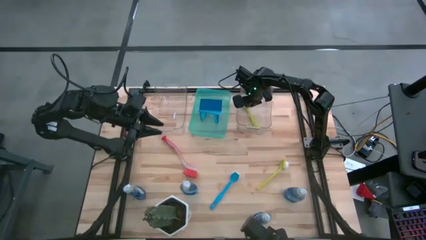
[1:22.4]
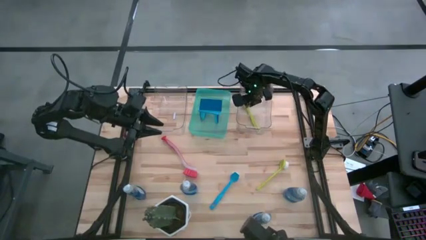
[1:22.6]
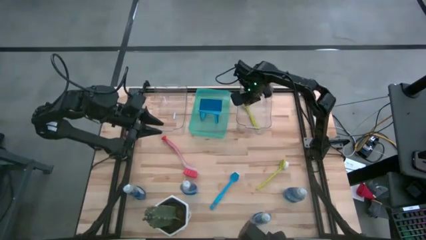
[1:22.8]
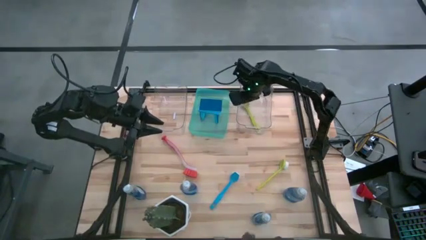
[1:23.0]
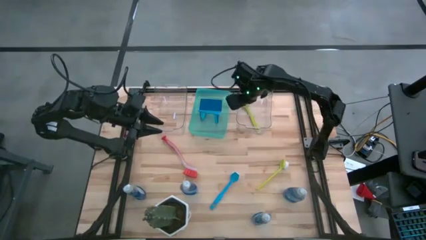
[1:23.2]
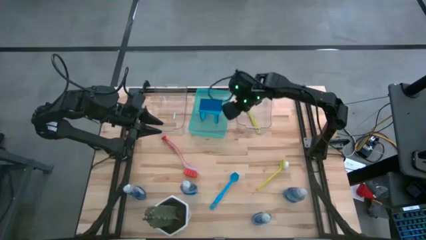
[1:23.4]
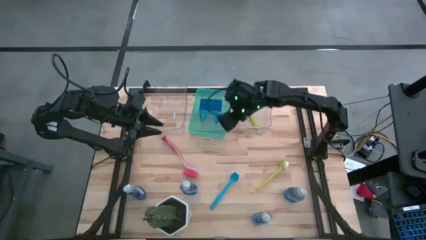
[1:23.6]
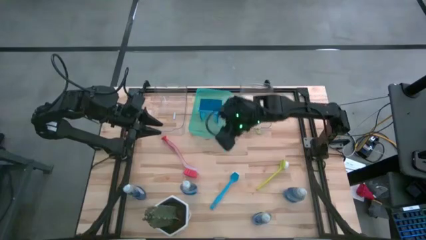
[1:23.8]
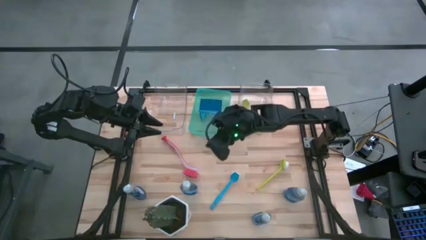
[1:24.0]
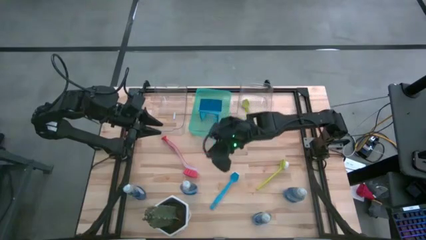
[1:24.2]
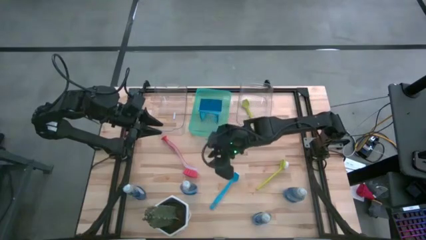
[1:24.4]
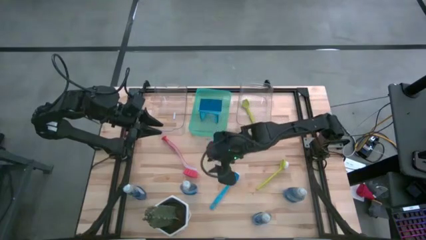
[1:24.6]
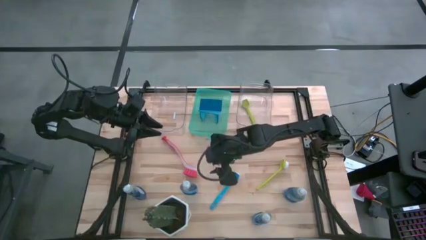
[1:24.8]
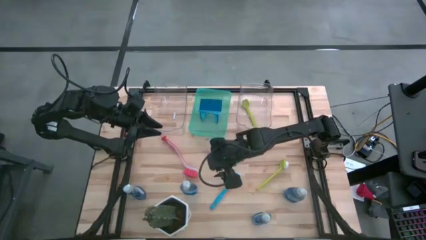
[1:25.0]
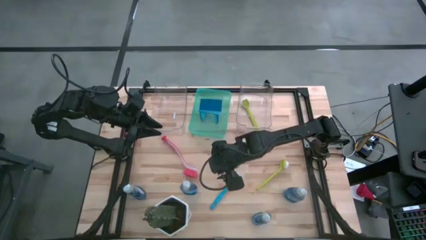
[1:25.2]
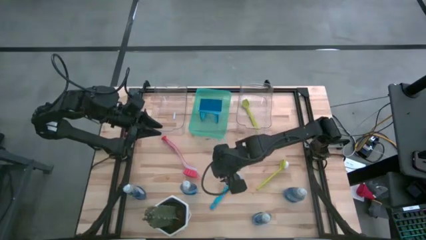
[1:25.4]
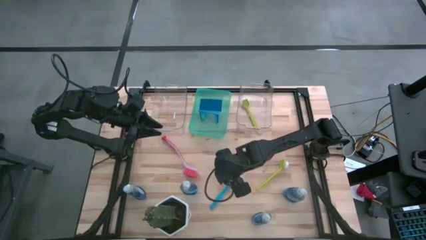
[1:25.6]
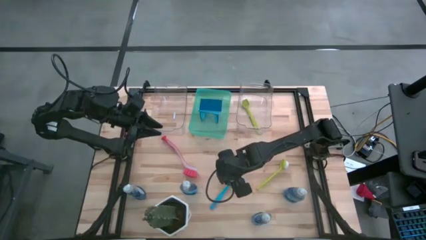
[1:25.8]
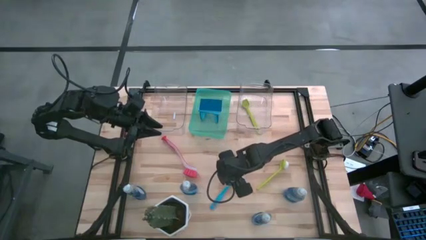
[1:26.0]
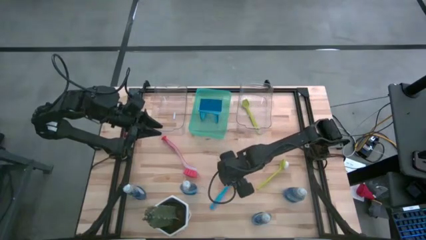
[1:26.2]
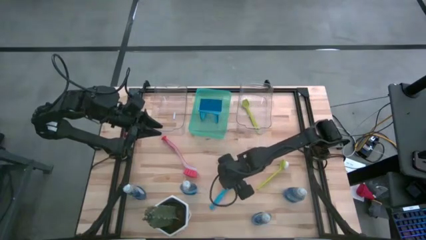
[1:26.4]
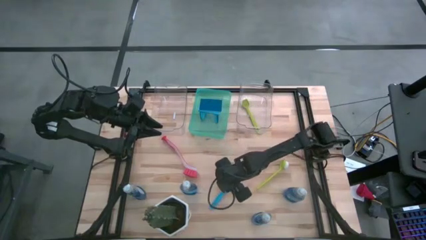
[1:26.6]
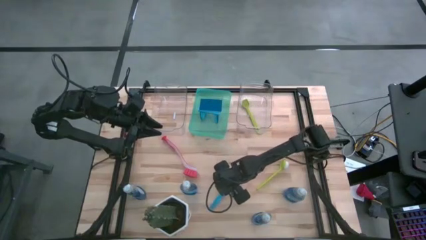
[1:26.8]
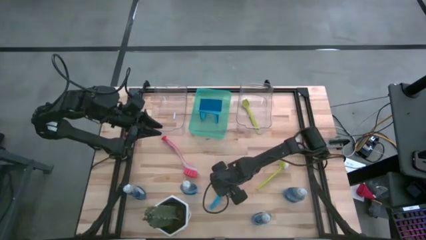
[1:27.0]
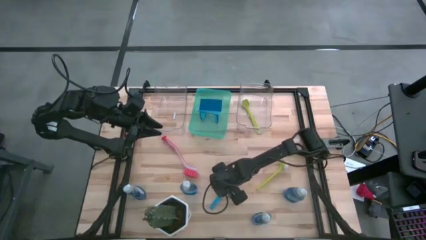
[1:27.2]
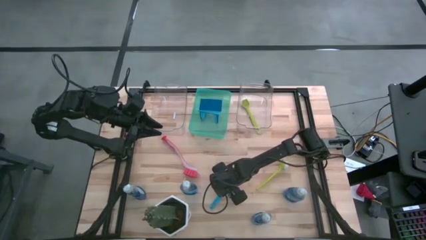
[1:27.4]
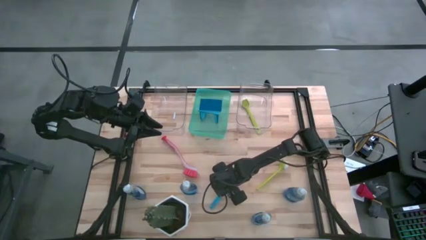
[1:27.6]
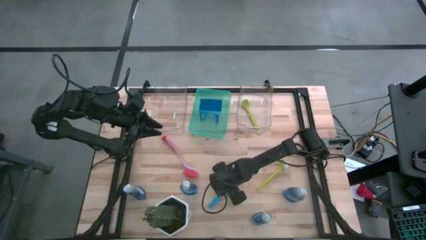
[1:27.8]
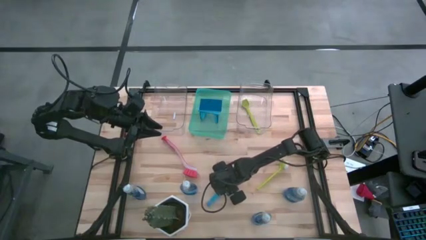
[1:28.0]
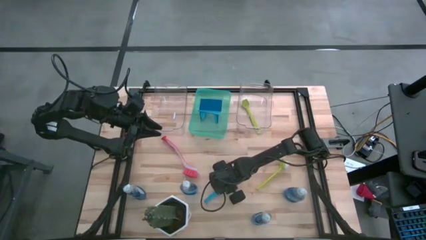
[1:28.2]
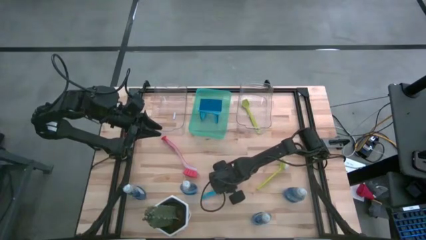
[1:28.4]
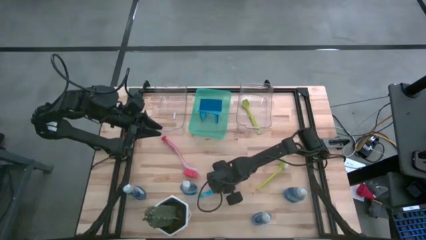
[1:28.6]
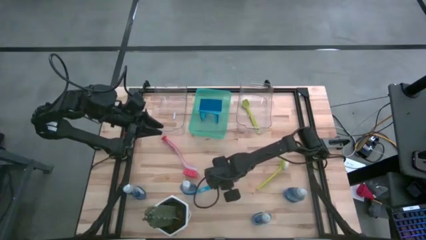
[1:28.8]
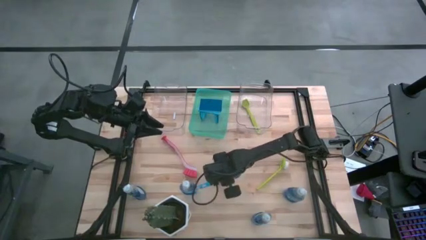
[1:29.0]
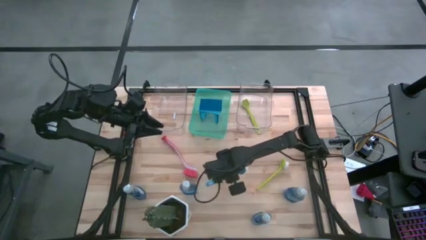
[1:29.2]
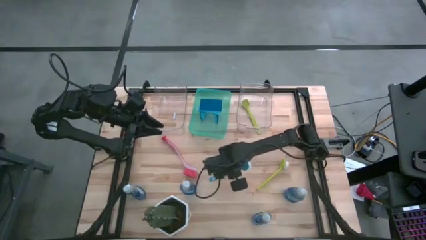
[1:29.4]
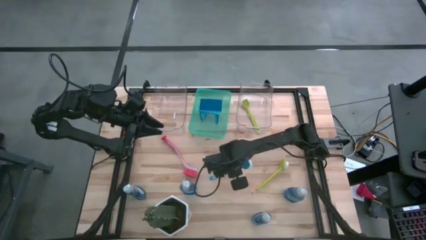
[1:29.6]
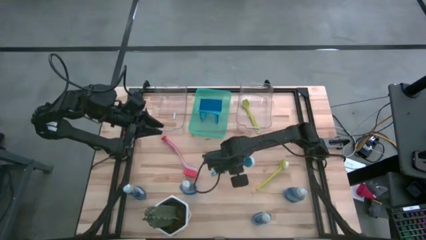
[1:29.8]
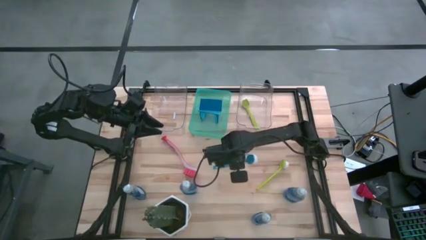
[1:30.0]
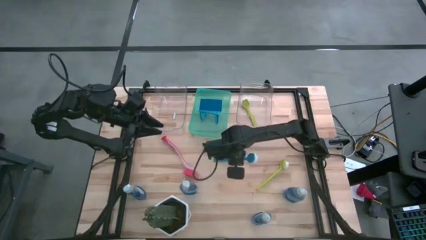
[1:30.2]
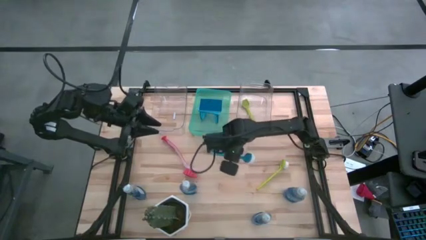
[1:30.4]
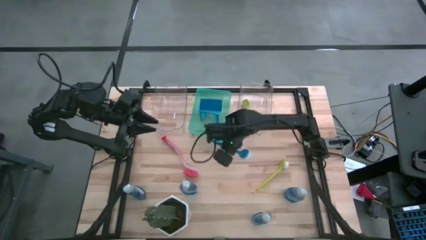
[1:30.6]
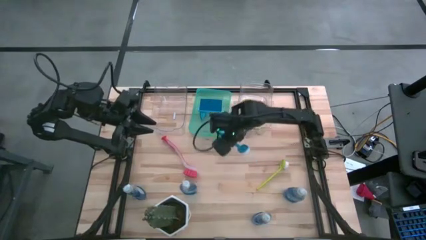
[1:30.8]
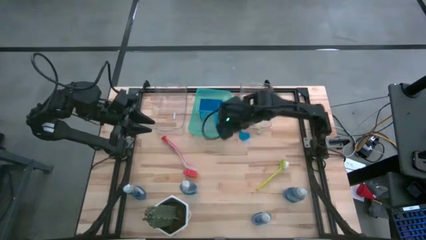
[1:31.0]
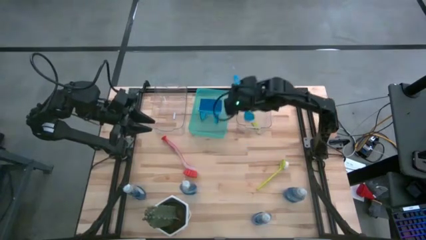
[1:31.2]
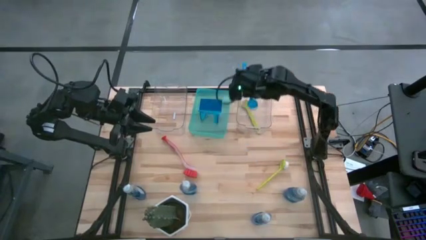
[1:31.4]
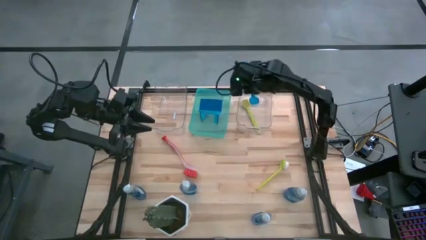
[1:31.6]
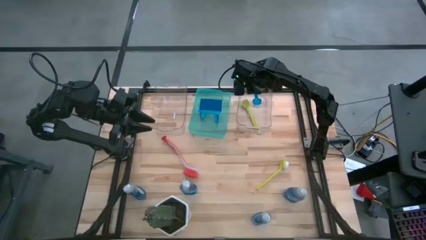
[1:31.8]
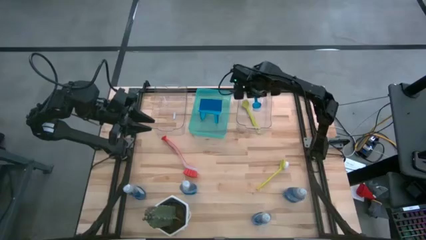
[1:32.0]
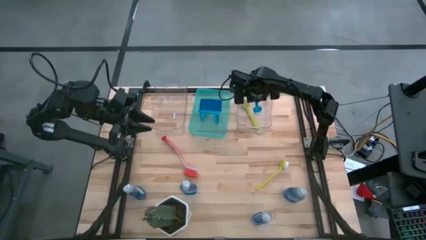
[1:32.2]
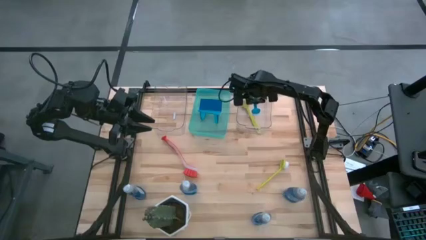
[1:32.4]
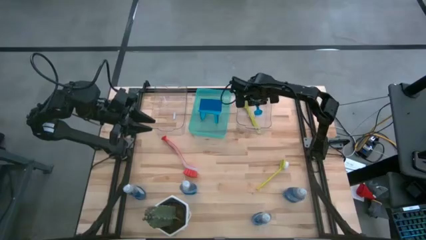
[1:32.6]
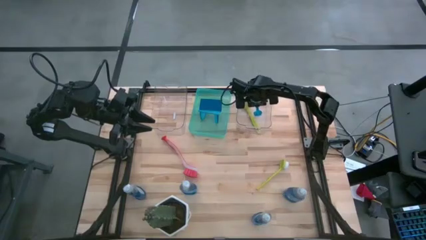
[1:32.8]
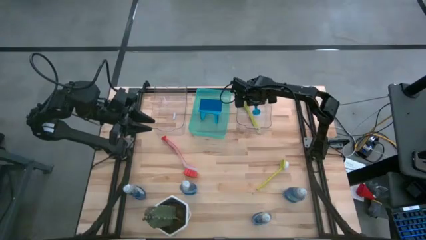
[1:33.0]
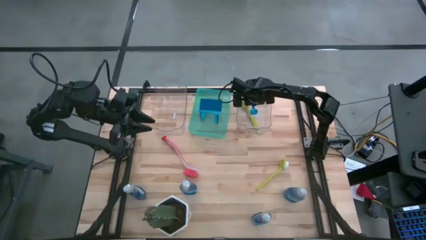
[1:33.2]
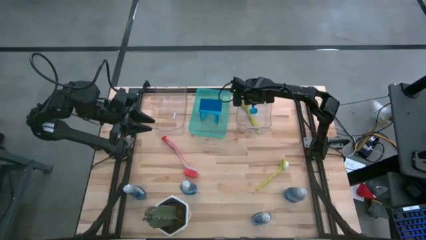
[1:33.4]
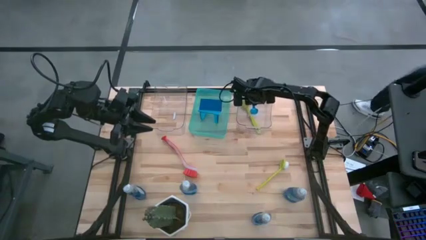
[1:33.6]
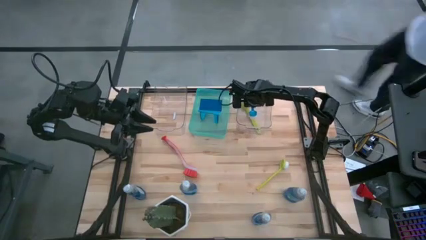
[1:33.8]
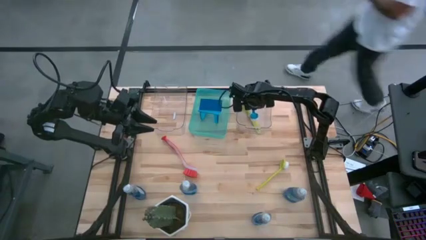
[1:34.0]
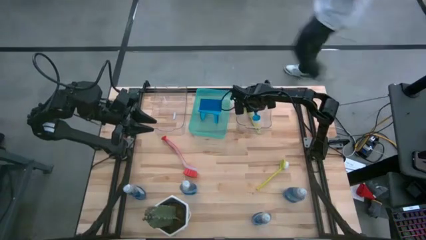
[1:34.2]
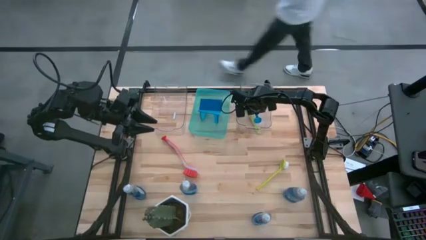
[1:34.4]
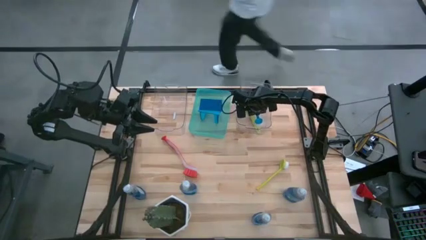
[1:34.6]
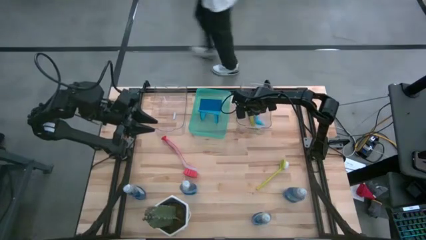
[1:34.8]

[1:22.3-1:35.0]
Task: Pick & Place Kitchen Sink Supplies
Put the blue dish brush into the right transparent bin
